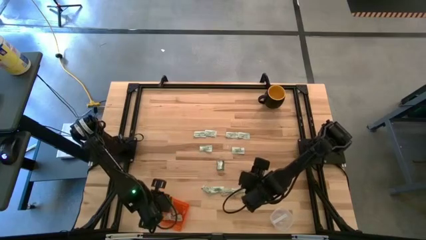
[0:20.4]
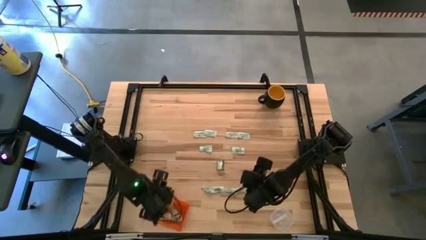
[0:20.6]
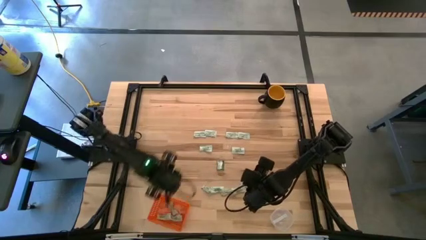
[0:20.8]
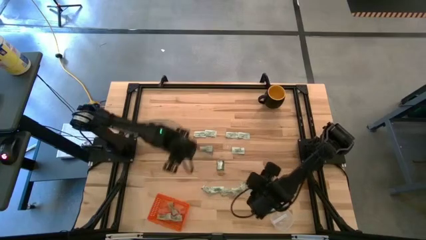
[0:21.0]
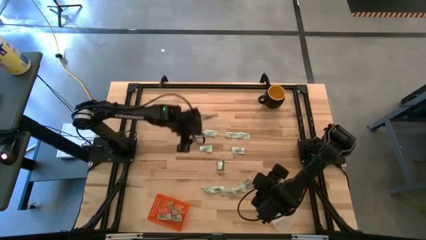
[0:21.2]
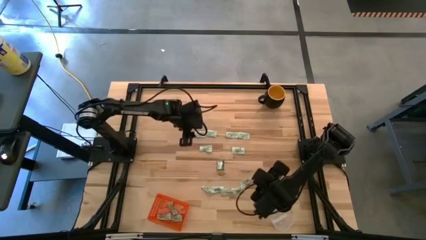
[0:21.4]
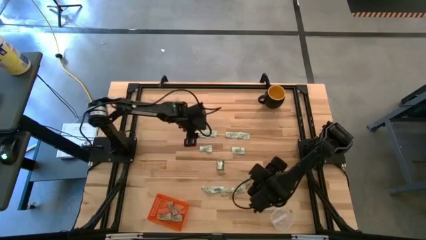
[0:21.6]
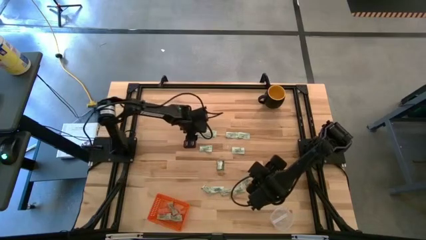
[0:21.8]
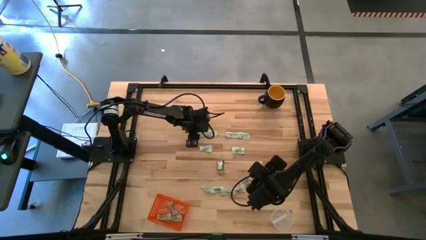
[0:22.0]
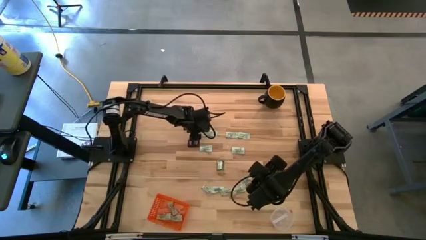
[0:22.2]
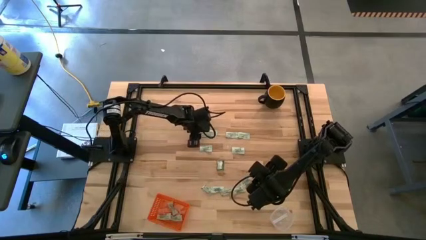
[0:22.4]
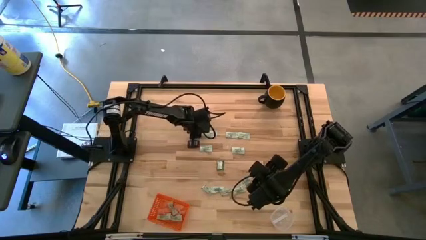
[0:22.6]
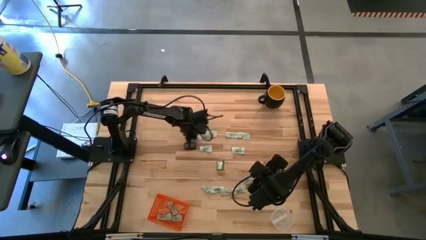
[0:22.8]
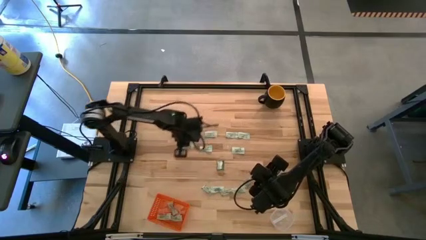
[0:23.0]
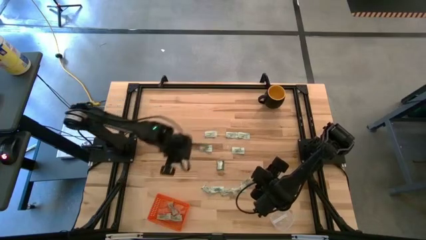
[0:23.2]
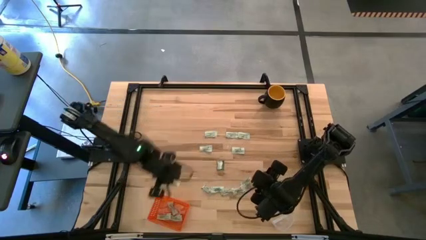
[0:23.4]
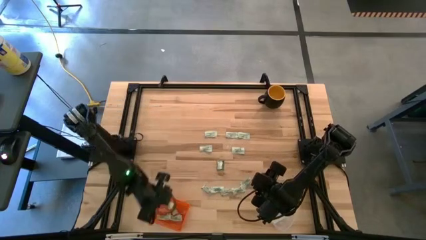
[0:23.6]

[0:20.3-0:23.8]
Task: Pick and place items into bin
Put the white stevia packet into the orange bin

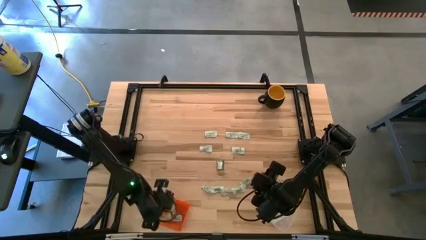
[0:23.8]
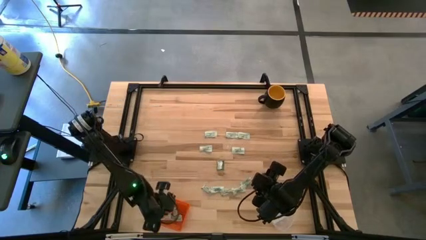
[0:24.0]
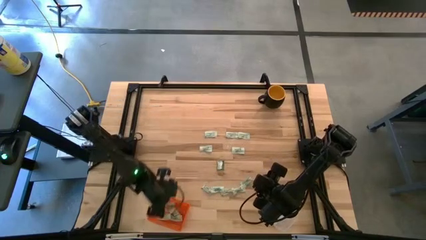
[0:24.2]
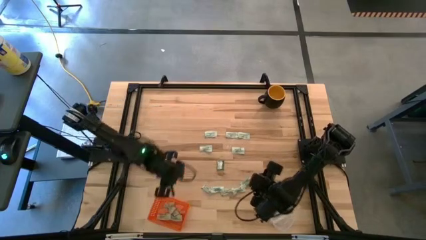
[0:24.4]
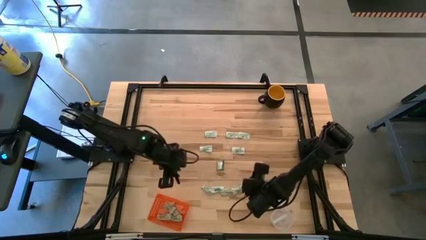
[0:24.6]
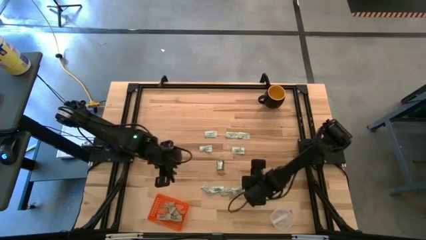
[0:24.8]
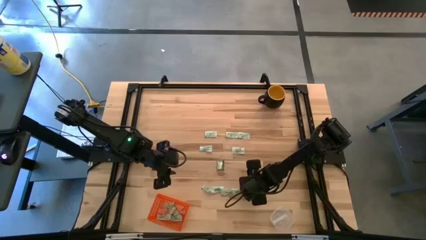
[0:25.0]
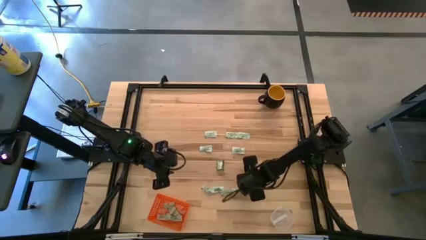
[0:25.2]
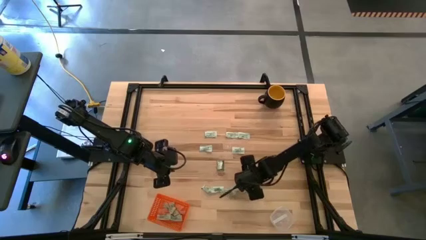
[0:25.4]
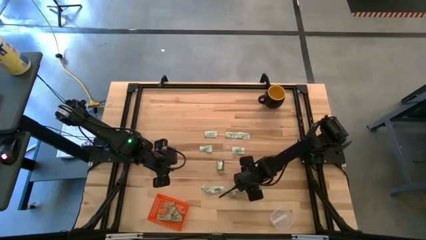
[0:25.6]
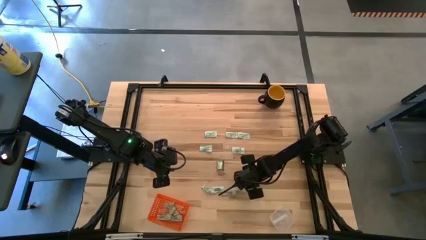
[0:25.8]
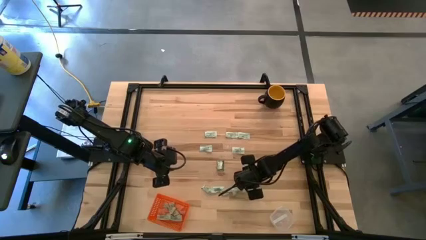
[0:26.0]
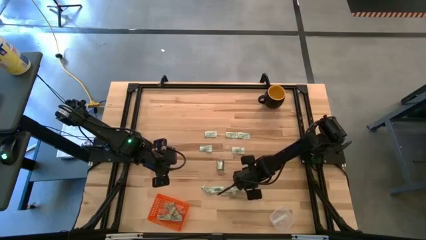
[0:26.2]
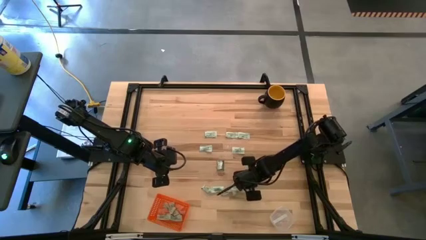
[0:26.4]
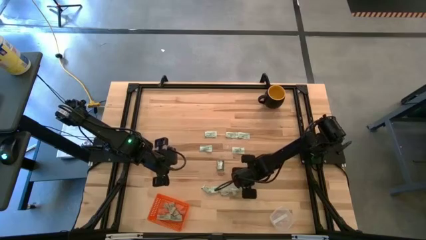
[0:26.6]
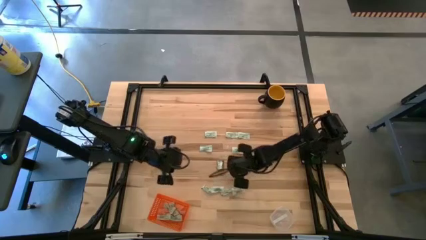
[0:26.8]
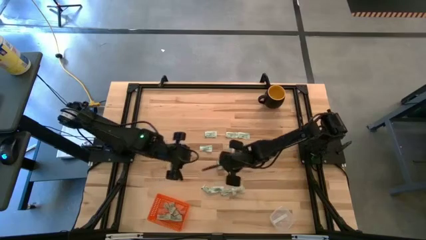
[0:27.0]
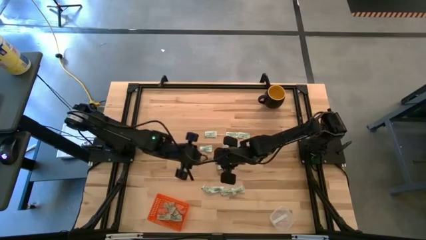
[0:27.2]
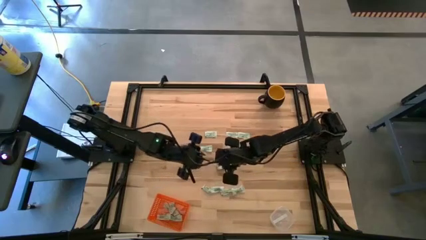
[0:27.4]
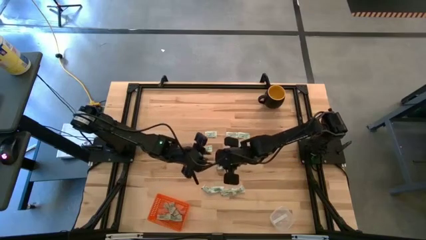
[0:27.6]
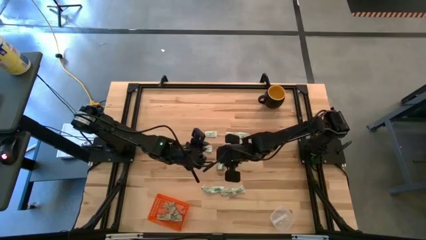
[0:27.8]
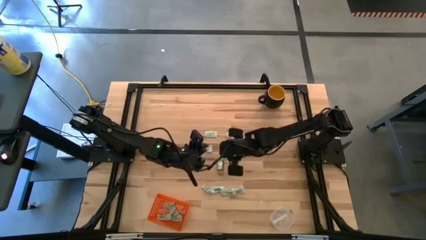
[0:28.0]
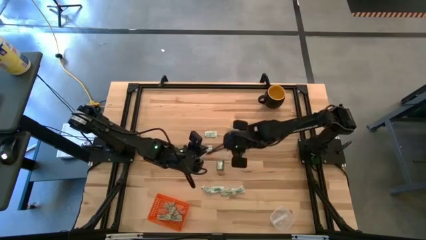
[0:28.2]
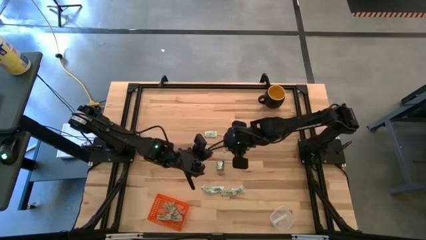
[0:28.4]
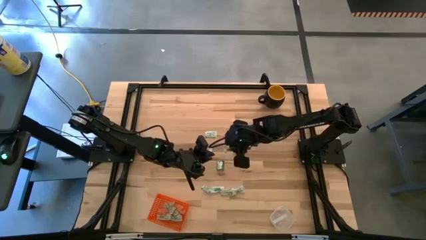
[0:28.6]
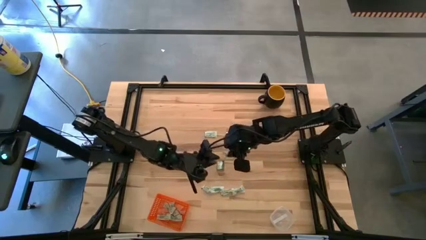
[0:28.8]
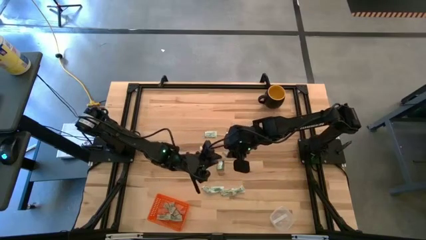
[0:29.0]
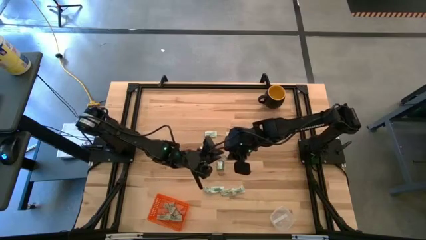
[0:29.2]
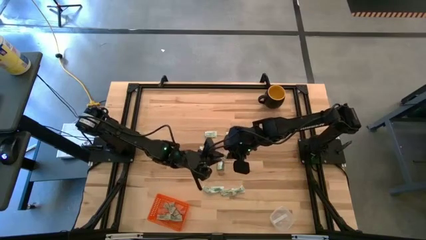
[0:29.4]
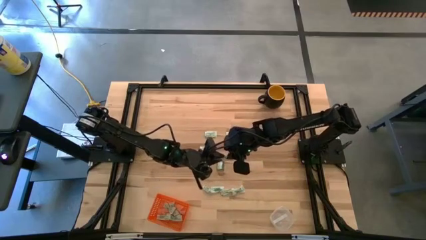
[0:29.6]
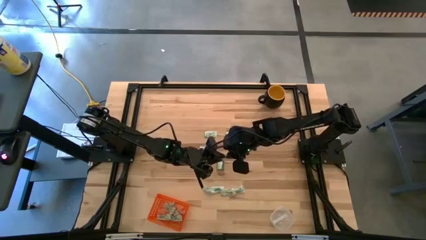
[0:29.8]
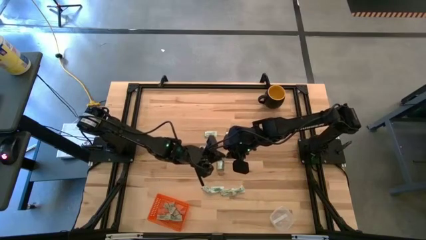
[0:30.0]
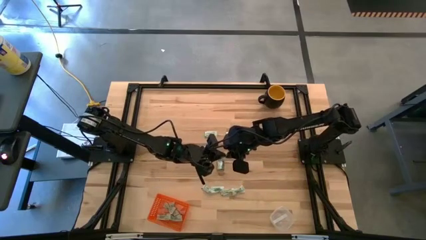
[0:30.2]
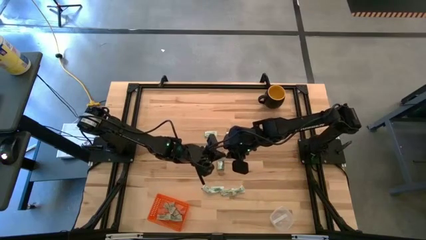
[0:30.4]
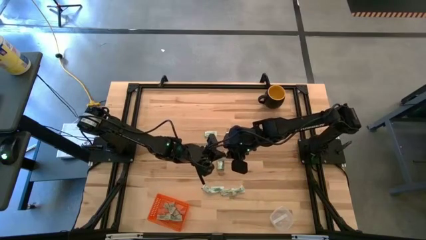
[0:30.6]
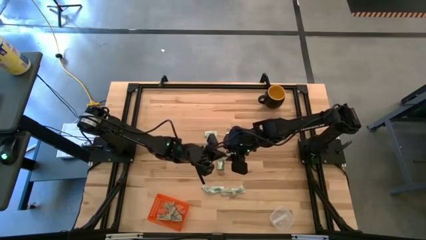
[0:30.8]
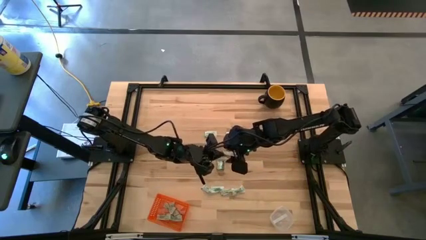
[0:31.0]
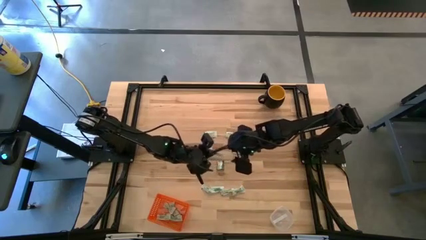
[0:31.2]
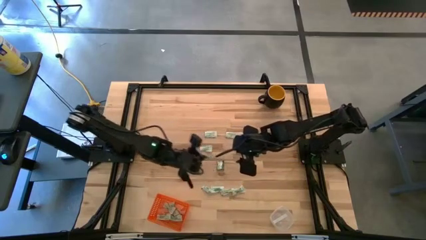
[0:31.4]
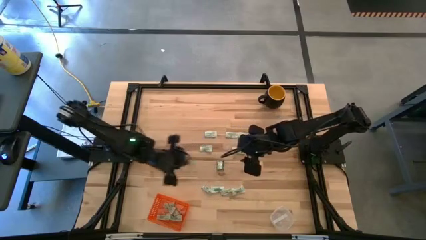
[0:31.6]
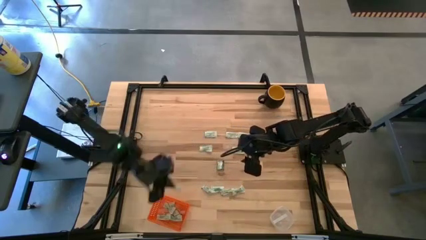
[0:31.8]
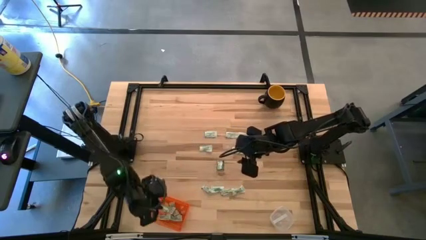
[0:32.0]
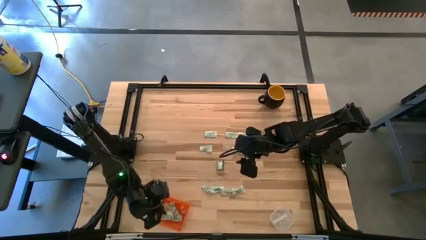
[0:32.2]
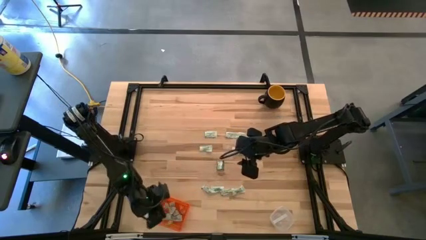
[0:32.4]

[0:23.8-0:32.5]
Put the white stevia packet into the orange bin

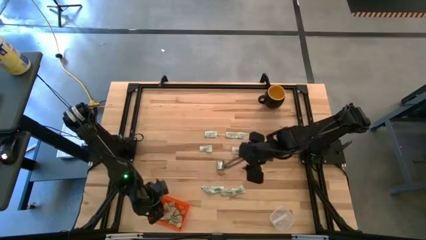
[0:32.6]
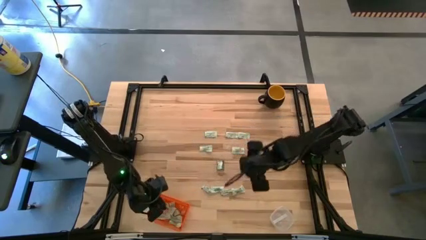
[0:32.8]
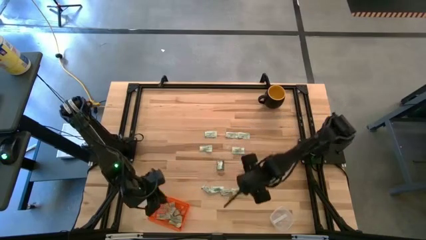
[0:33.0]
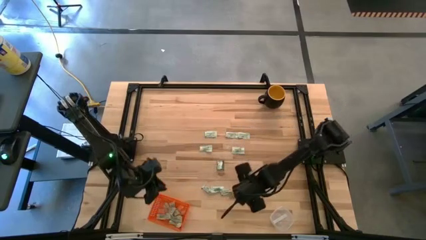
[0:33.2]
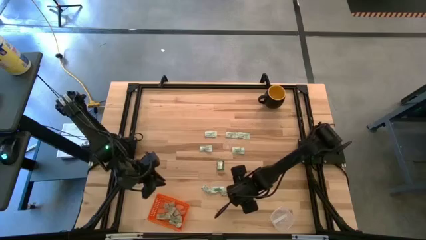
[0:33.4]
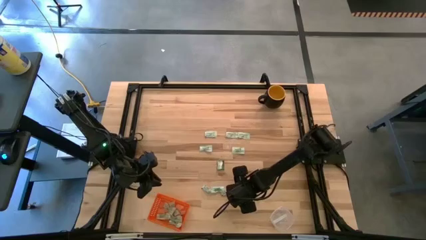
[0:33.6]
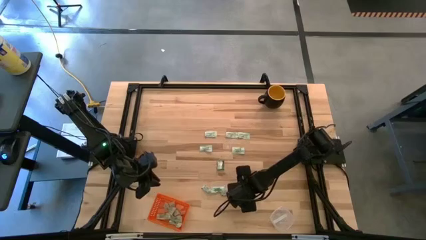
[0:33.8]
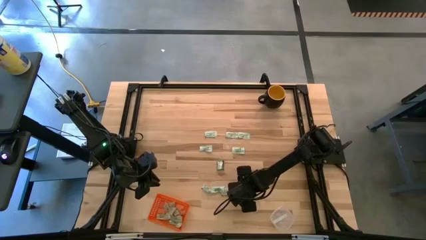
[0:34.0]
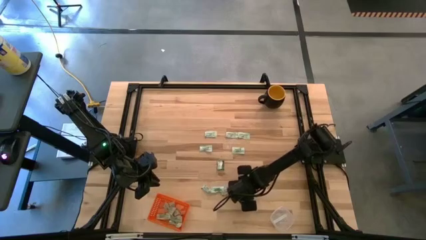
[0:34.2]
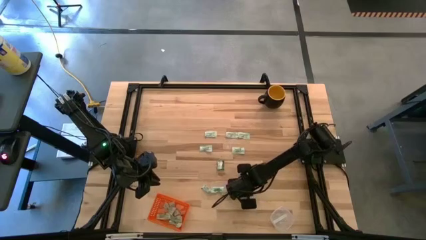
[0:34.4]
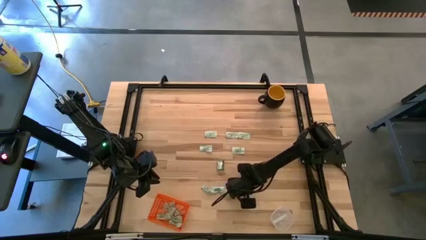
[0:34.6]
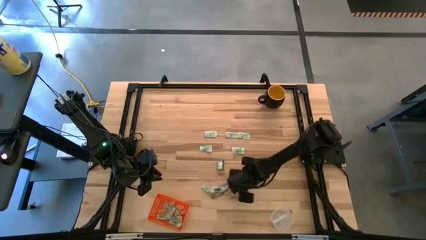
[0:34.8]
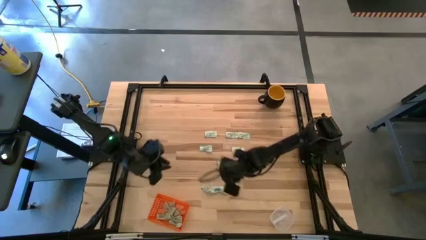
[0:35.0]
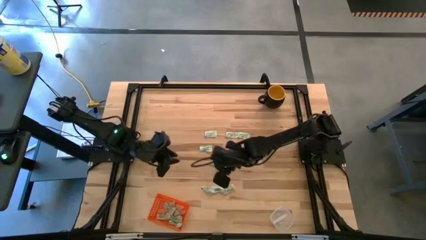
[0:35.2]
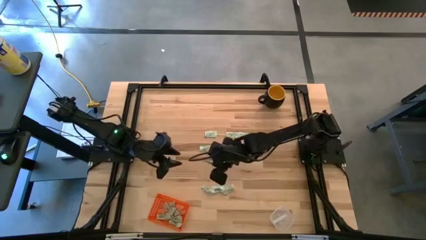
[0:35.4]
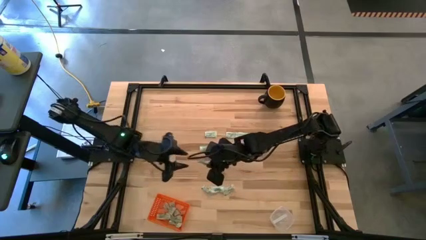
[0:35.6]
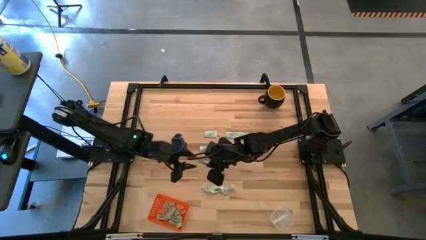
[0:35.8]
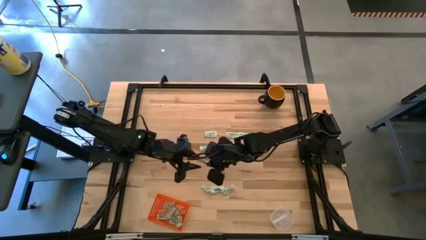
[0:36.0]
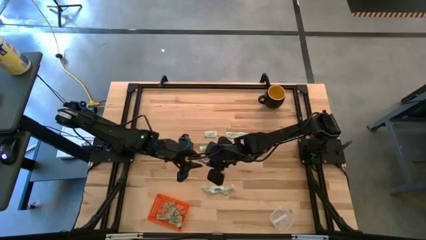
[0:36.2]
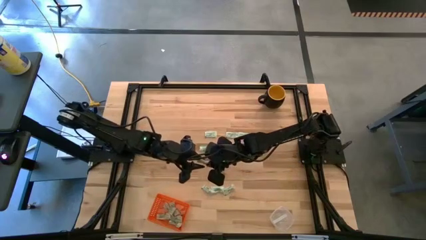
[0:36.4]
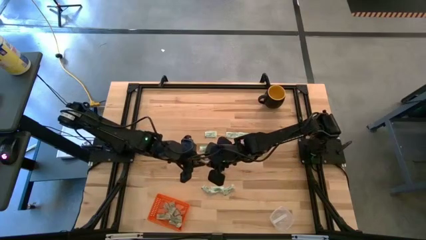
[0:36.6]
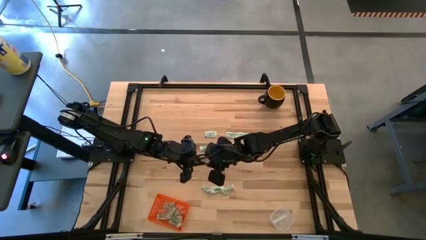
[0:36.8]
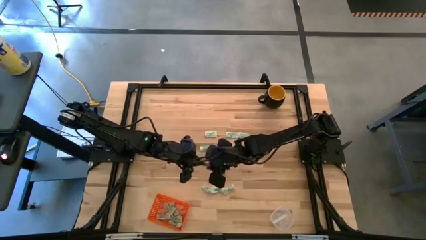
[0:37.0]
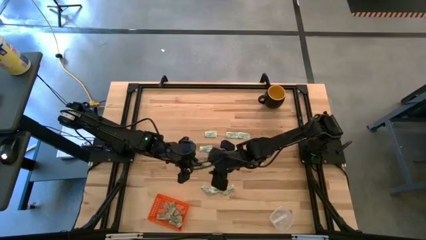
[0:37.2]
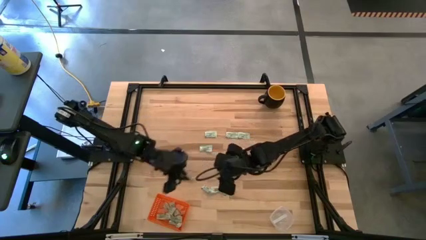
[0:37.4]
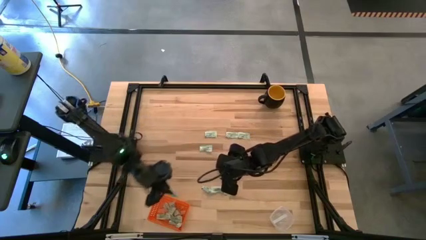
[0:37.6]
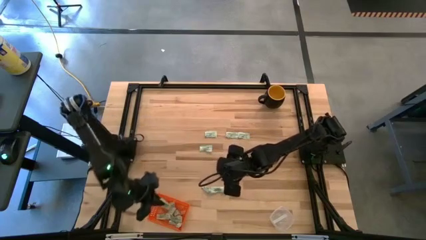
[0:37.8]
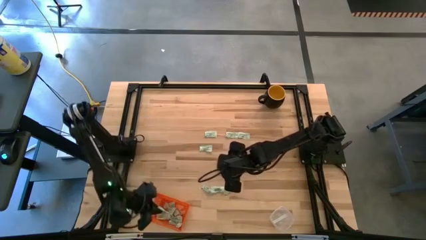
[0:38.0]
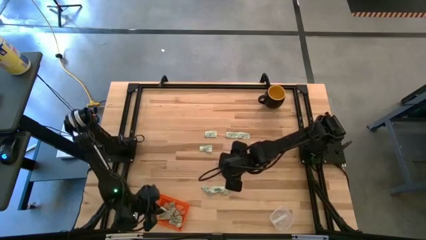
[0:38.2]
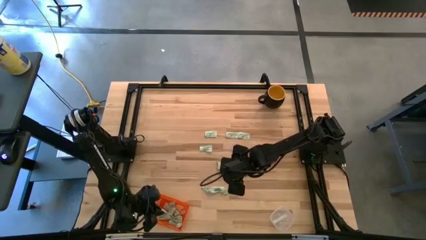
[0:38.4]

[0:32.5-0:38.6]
Put the white stevia packet into the orange bin
